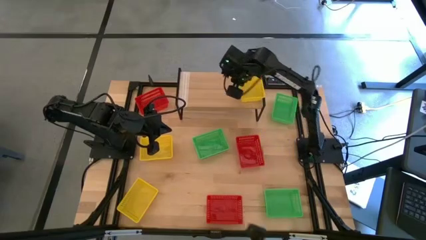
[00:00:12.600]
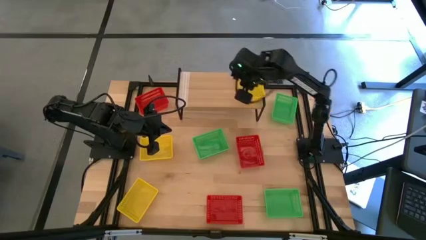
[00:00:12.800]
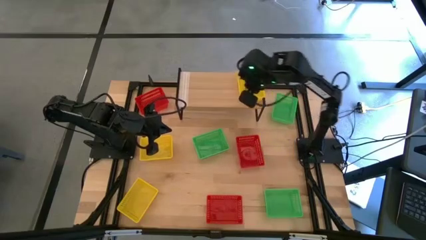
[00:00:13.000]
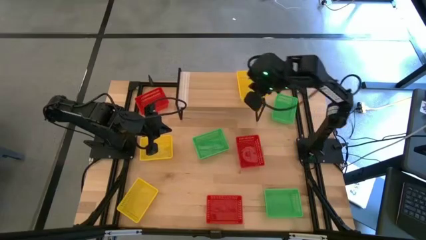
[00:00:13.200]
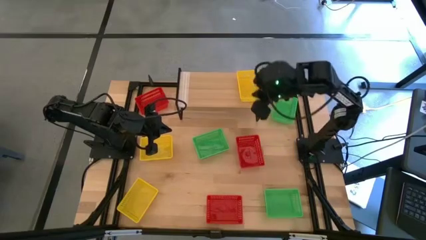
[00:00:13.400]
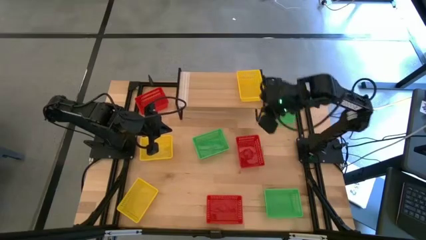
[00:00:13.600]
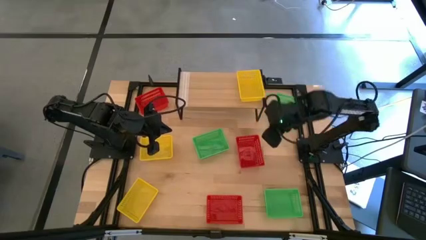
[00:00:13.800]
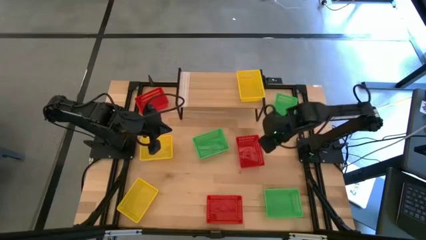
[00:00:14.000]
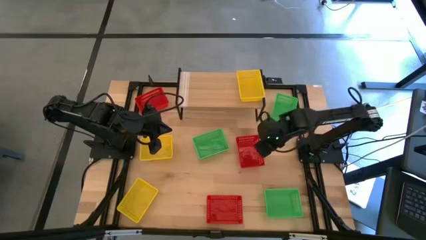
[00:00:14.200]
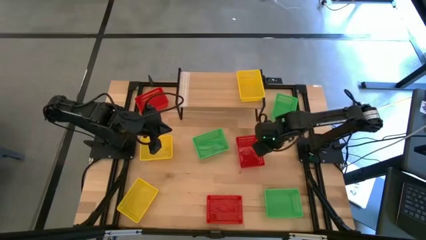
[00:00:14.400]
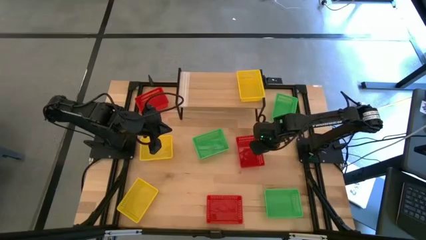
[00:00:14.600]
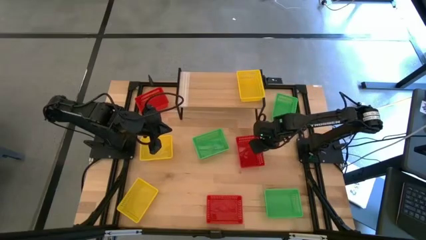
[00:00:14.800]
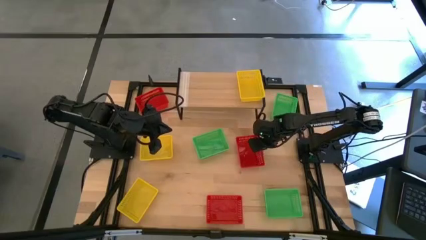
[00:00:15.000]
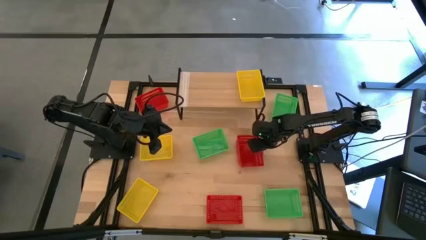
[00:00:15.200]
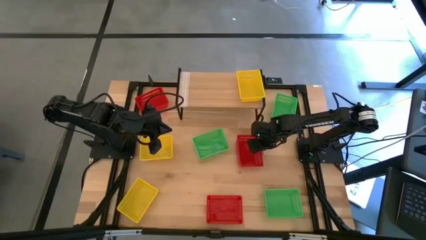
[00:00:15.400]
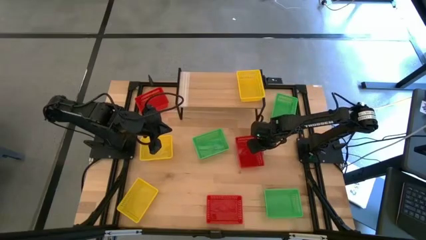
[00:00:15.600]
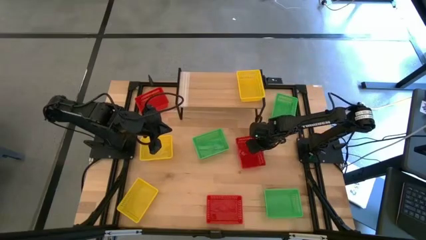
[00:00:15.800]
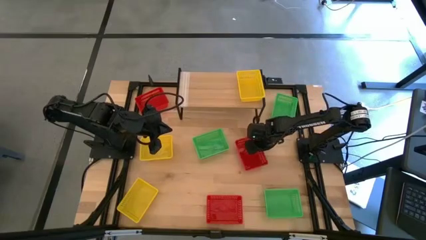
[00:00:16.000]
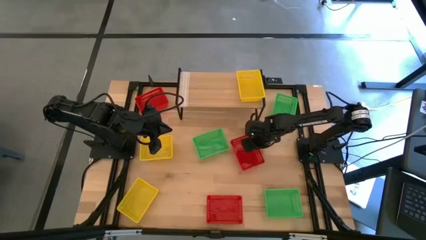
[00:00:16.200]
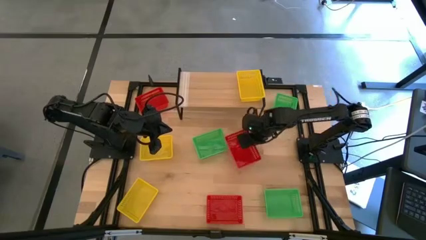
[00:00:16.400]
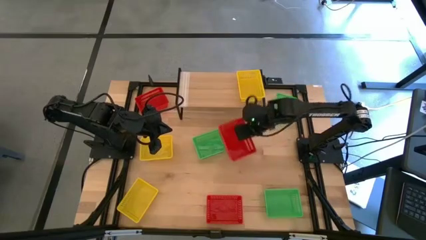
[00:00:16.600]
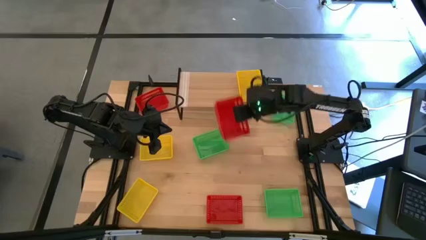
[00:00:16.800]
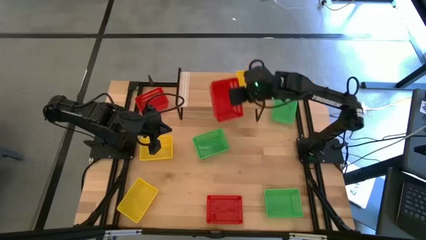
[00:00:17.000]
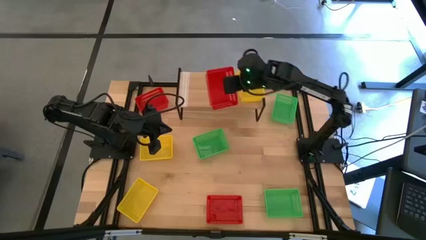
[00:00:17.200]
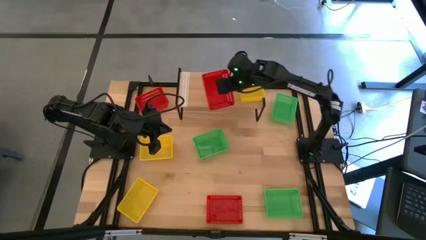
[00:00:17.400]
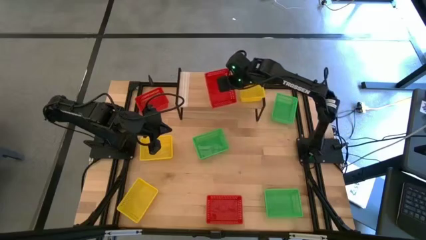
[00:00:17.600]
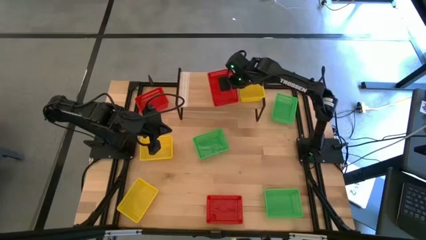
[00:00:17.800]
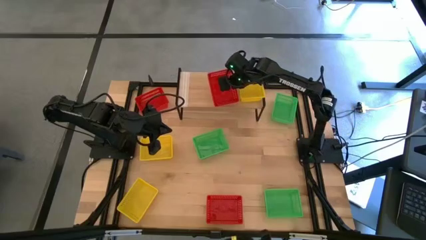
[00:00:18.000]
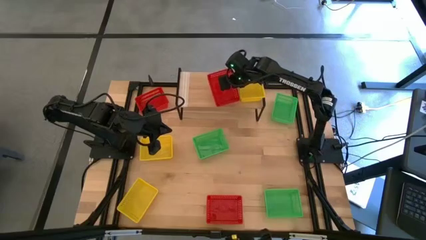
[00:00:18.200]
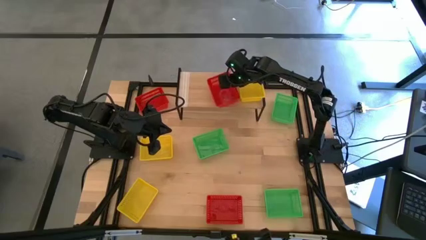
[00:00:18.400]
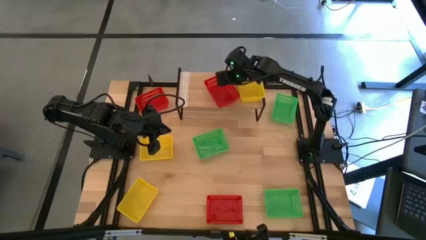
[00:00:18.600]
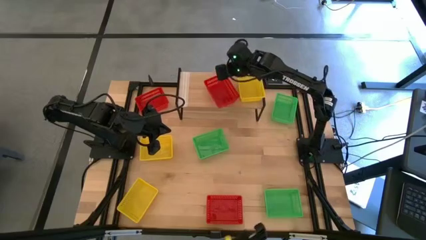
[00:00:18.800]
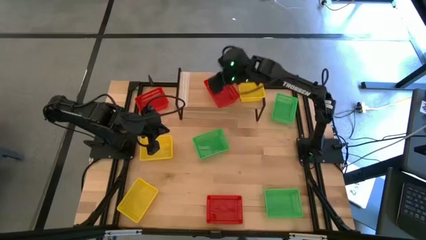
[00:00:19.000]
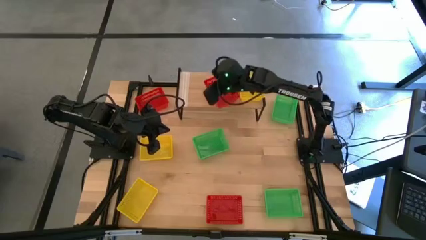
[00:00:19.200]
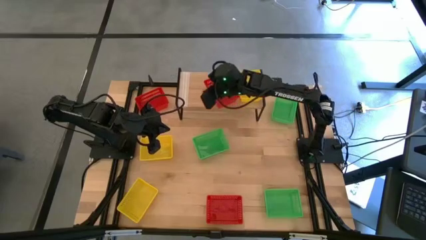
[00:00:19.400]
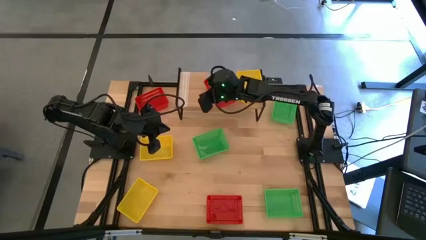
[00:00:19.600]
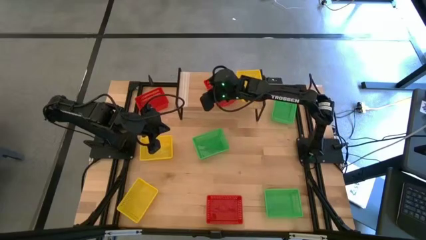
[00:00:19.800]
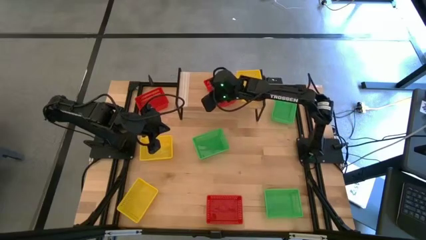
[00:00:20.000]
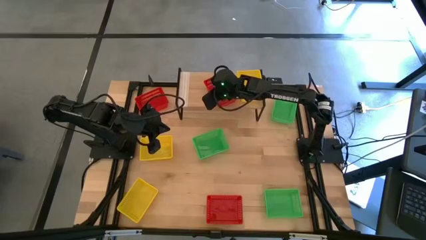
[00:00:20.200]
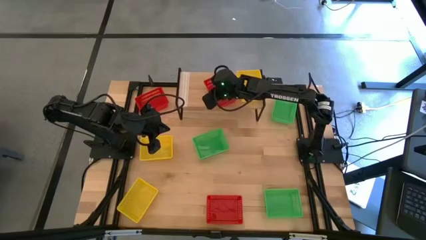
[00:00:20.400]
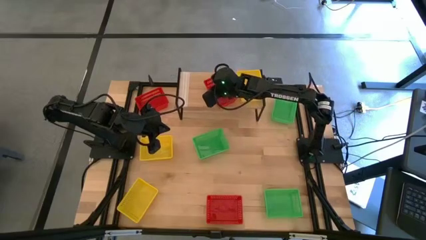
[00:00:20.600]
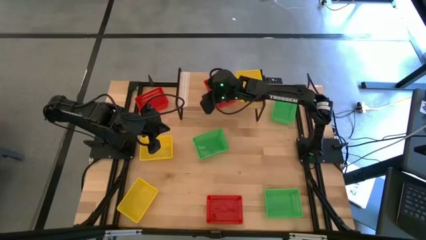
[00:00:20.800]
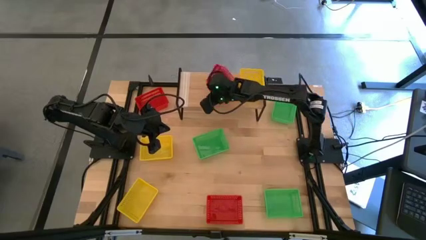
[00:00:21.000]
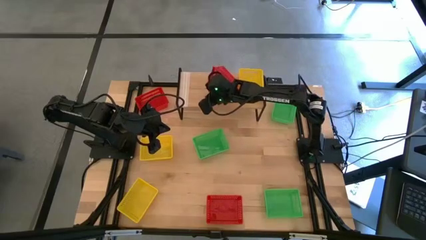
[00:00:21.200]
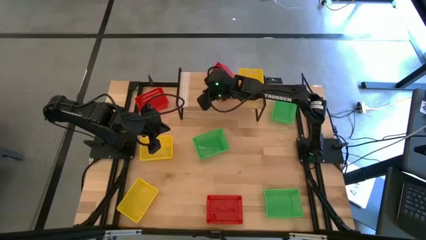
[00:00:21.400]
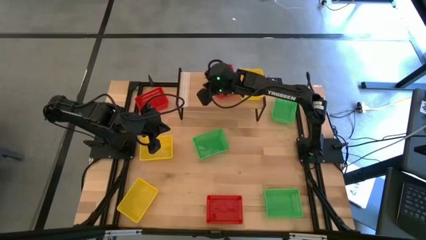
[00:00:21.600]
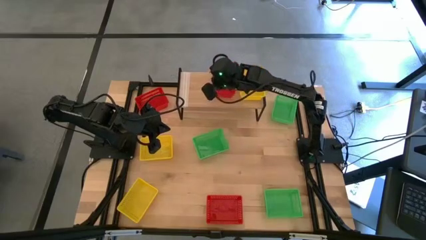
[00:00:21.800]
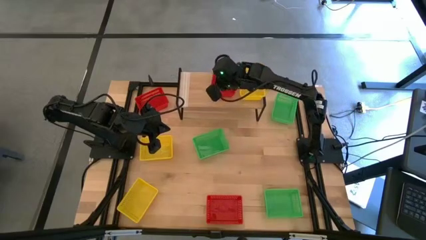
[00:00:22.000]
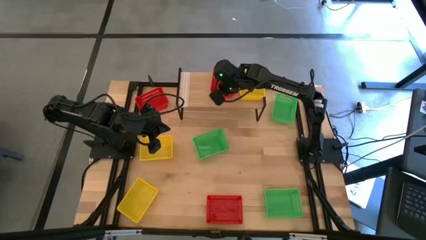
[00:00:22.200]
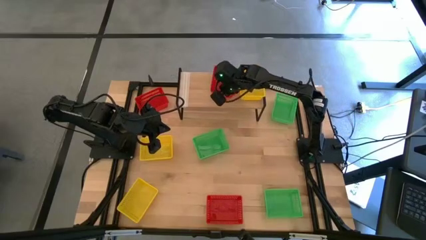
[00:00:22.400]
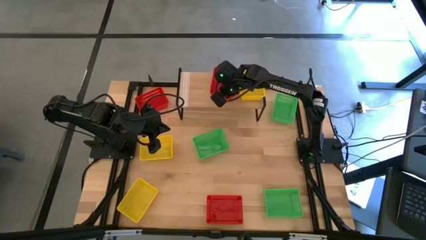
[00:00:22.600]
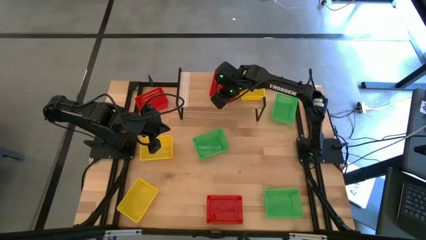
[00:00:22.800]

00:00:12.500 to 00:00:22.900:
Task: Stack baskets on shelf by color
Put the middle red bin on the shelf

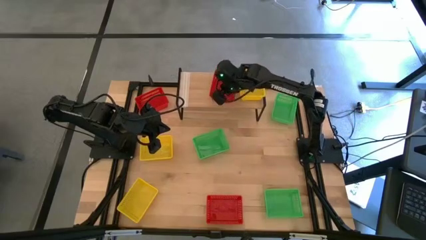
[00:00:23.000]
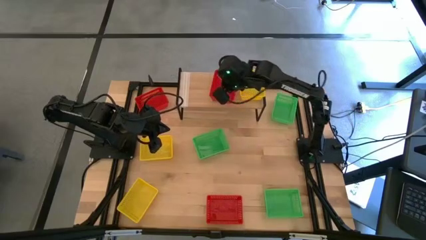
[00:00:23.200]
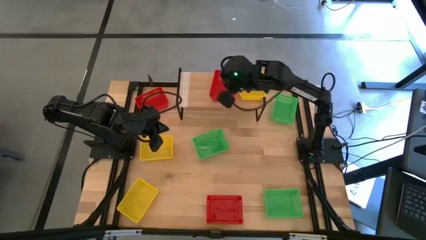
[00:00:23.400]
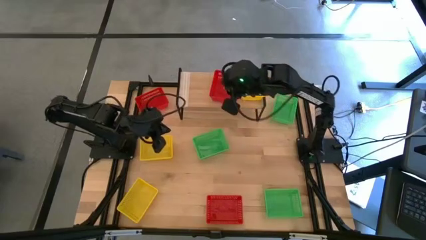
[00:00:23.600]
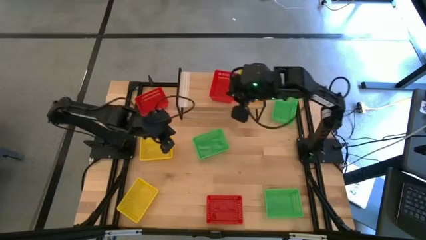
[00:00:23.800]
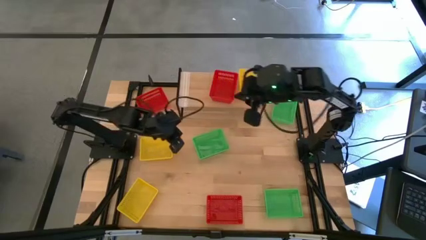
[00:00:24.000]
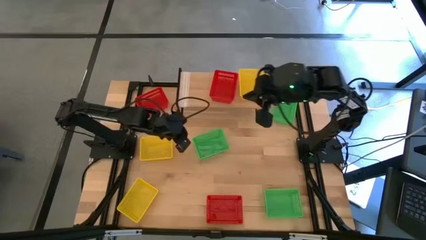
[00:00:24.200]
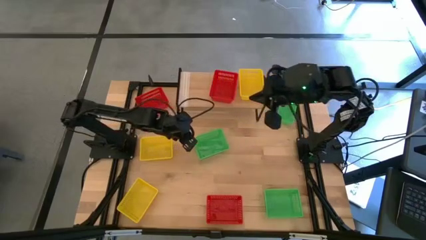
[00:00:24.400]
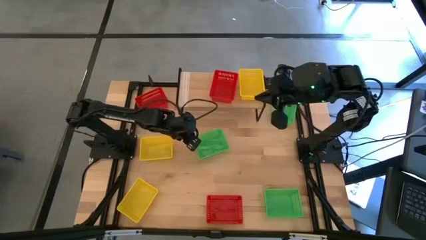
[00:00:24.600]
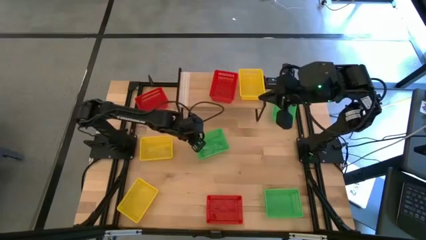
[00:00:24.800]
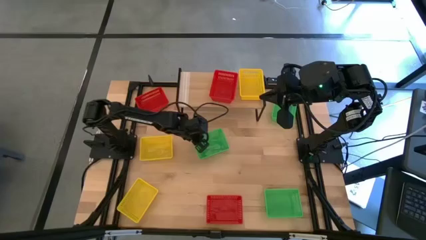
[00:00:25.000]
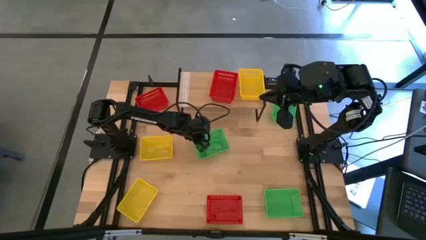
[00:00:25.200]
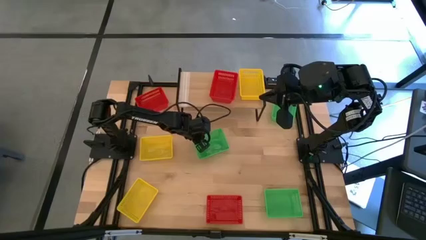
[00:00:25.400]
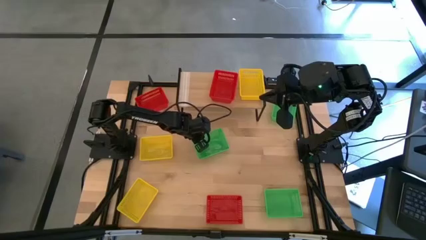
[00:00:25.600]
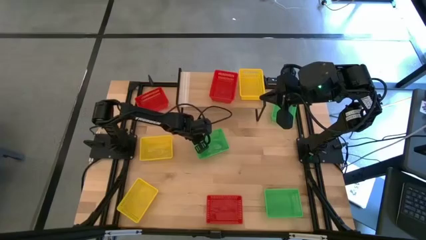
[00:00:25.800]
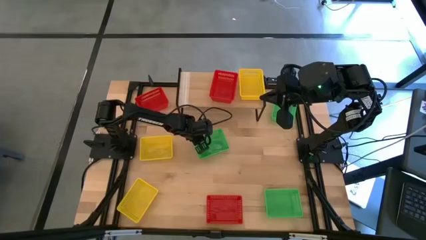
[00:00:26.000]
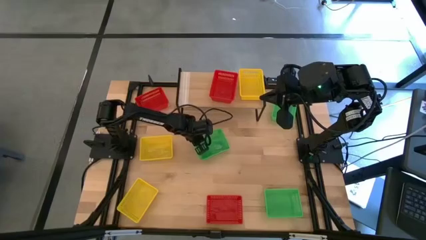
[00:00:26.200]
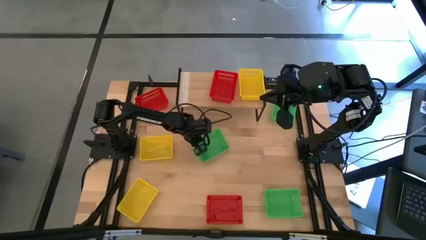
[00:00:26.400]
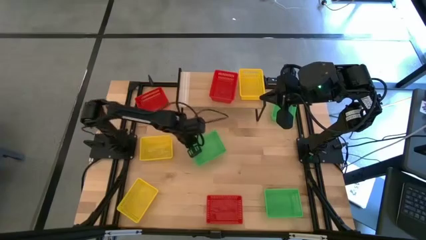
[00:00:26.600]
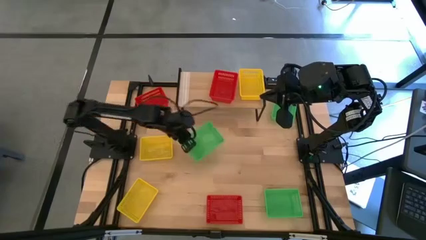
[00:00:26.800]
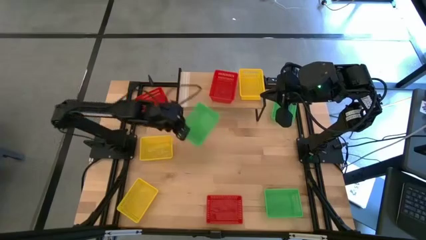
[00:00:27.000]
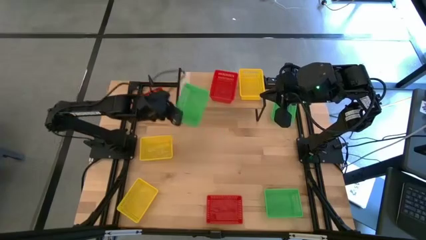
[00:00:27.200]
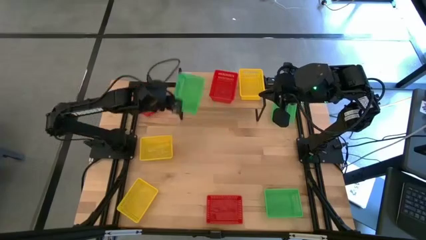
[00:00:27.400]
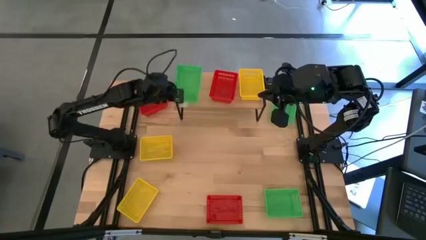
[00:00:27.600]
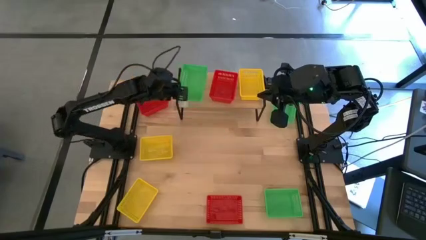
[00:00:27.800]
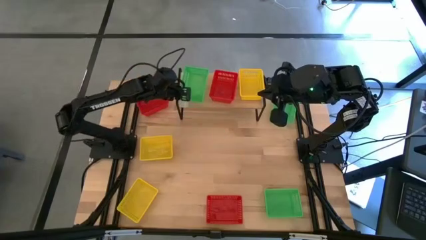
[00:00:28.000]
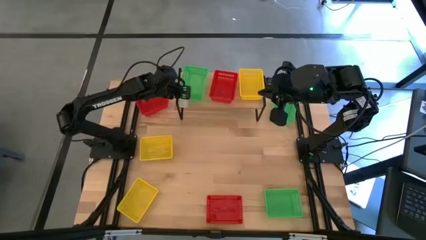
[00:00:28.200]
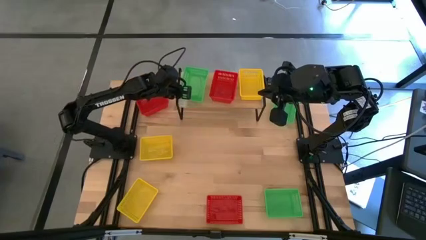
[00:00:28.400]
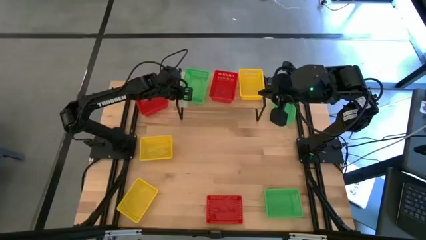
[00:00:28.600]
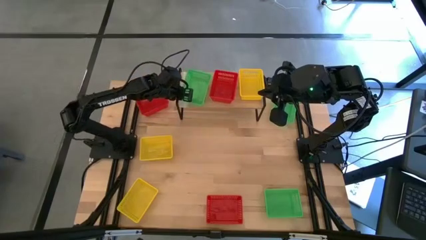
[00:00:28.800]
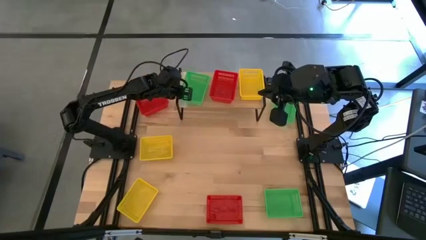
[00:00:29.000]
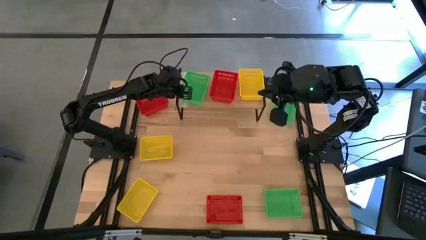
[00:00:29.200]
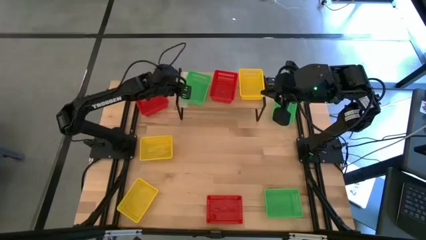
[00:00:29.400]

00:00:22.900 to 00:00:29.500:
Put the middle green bin on the shelf
